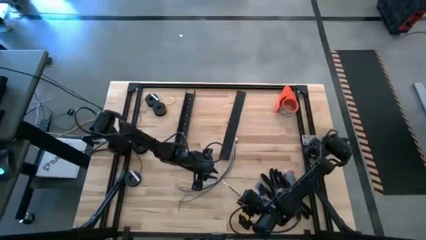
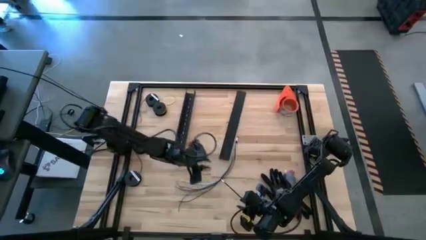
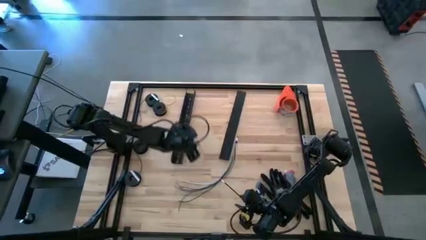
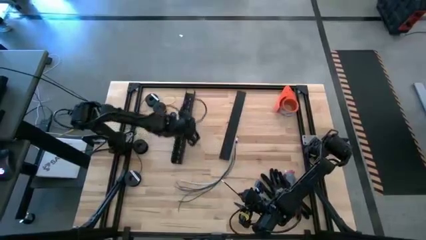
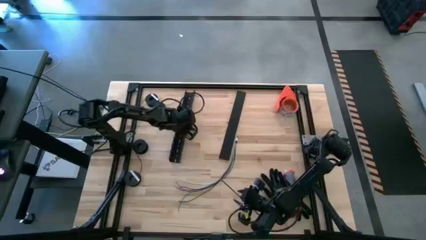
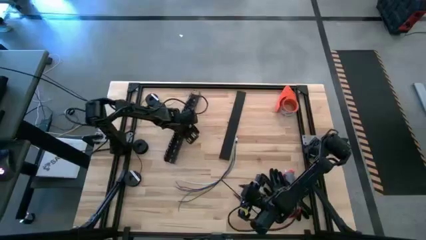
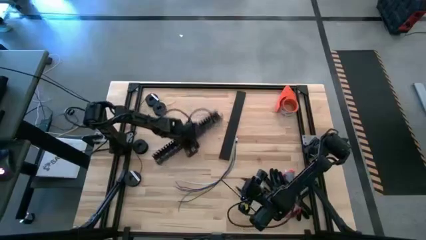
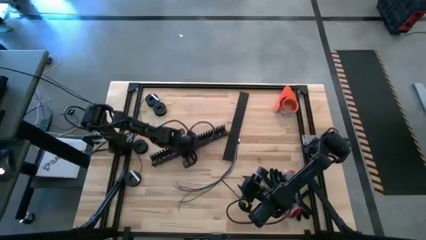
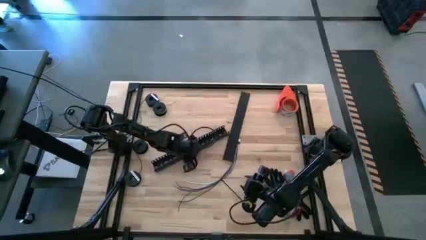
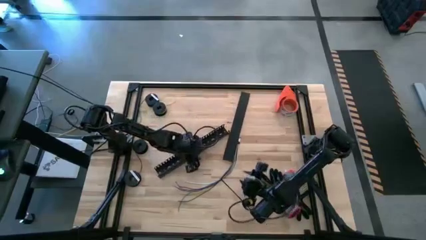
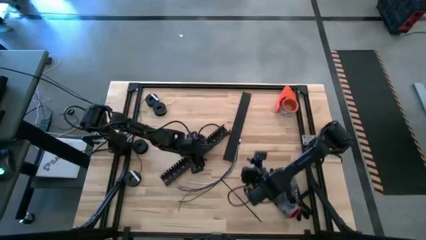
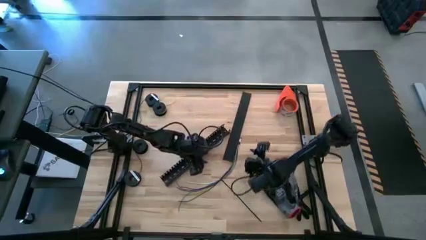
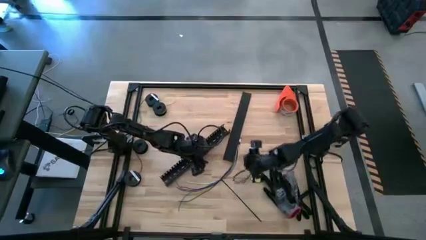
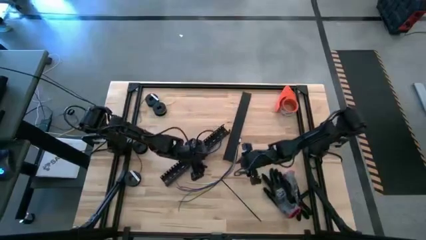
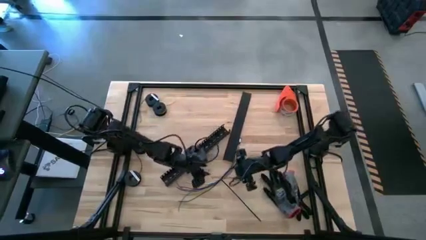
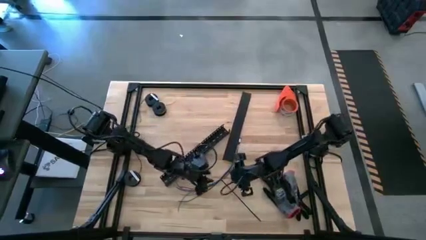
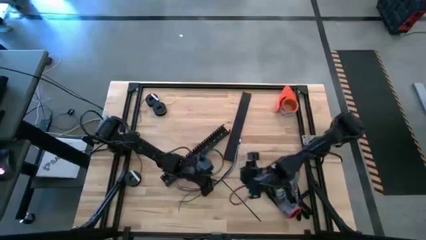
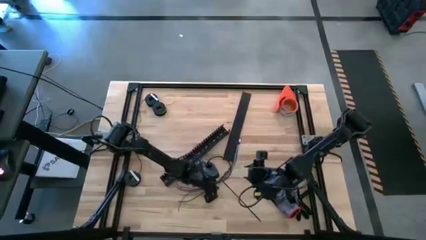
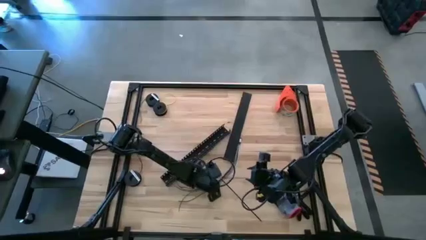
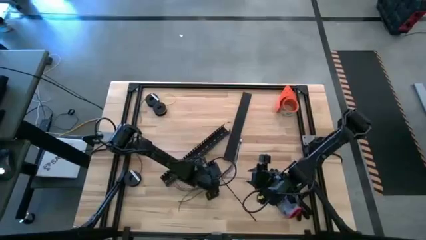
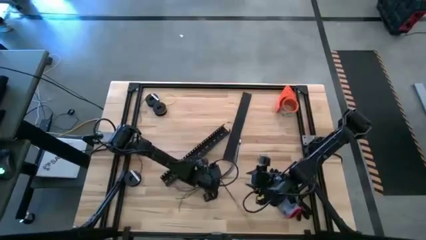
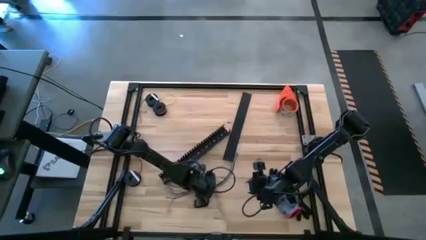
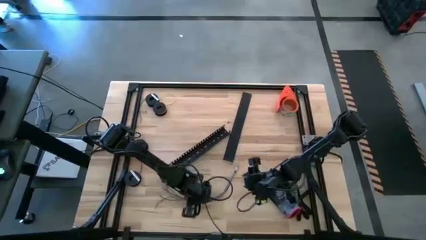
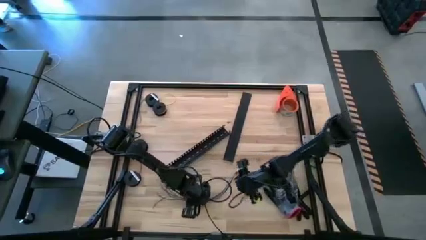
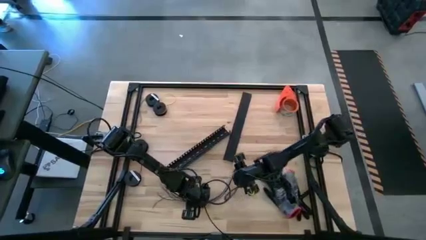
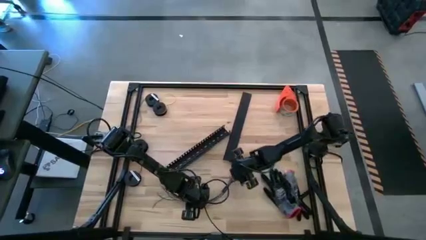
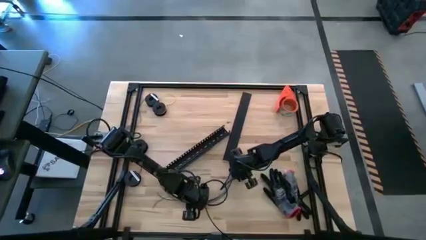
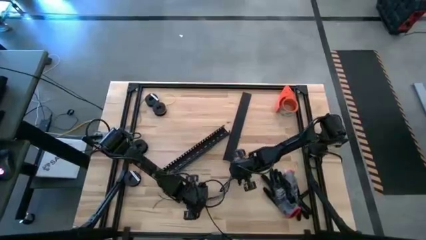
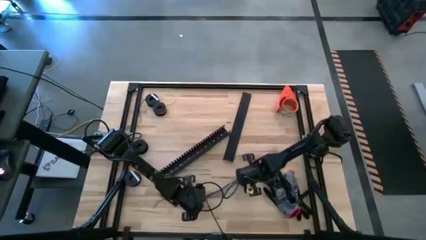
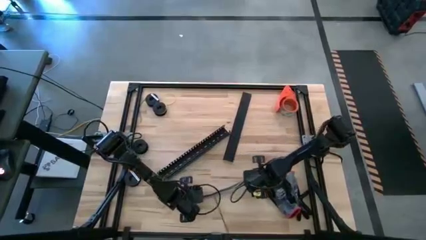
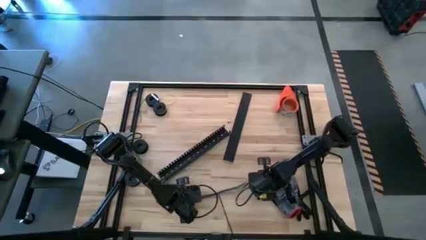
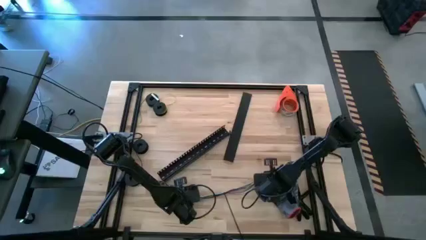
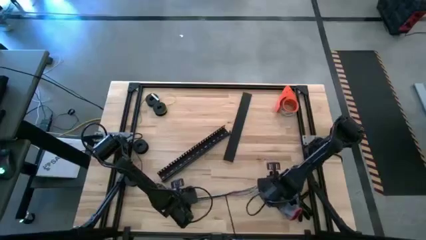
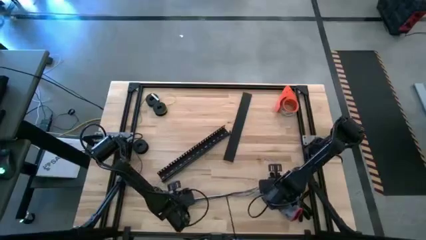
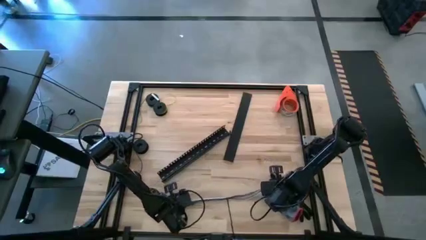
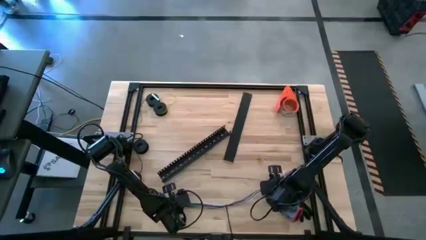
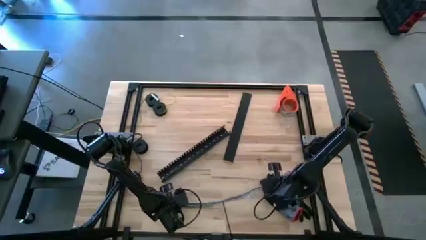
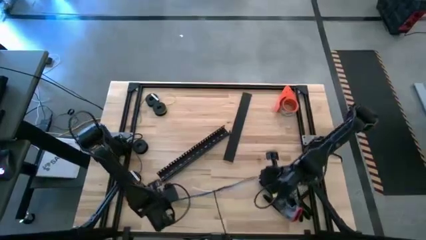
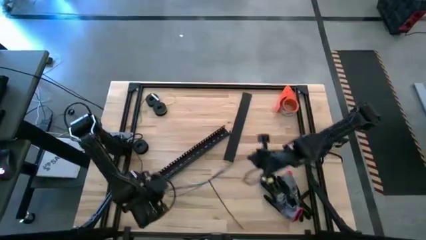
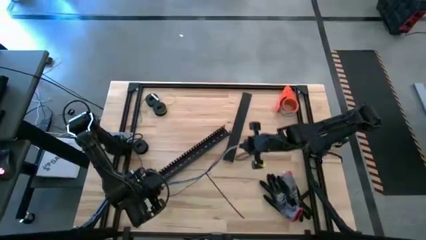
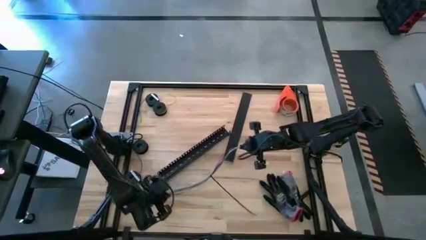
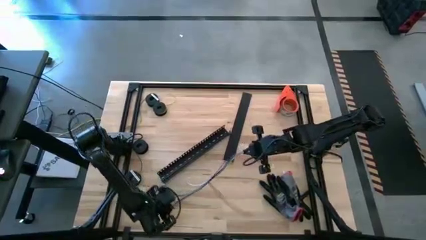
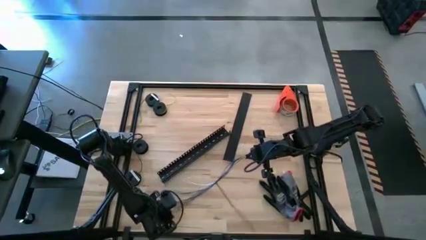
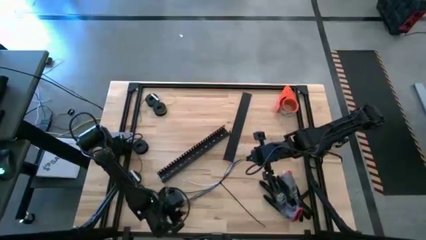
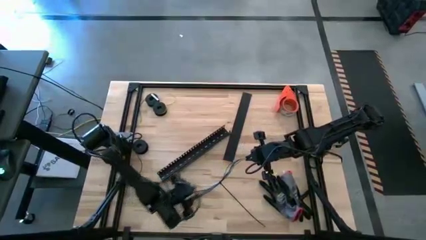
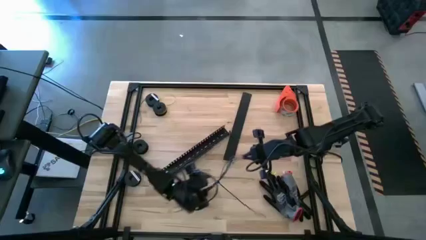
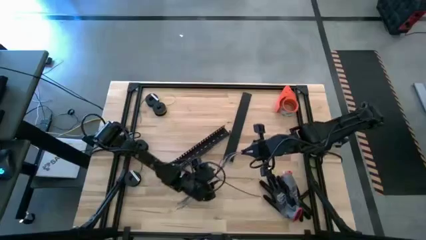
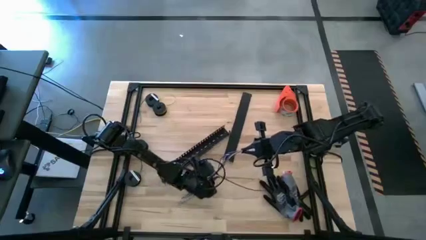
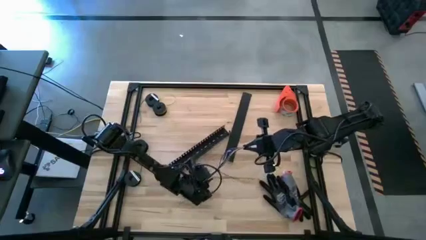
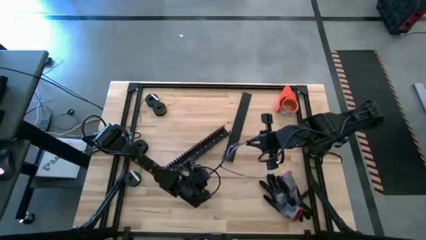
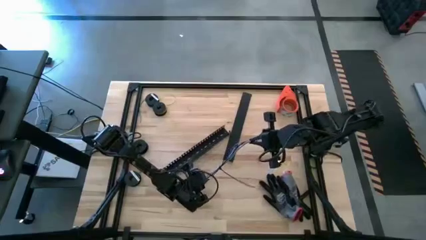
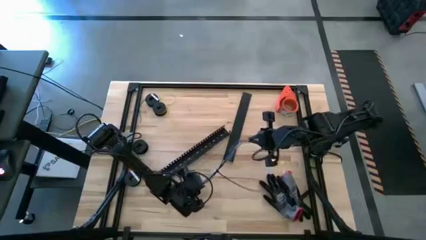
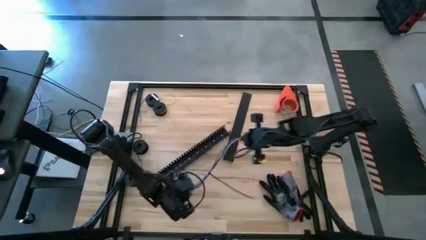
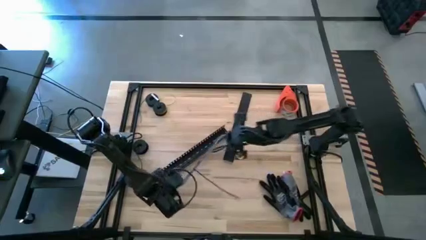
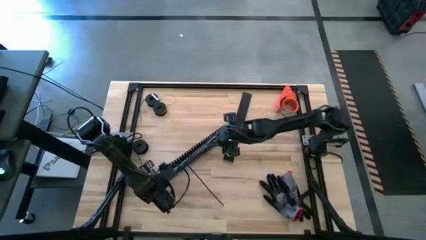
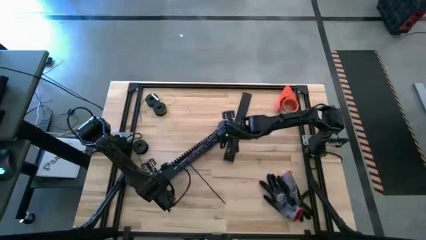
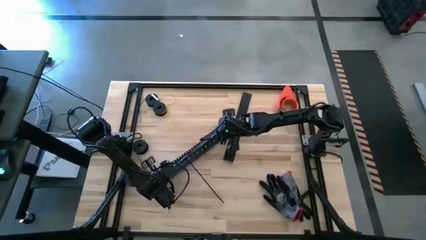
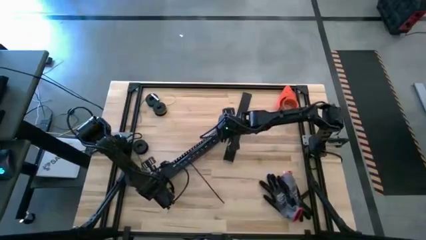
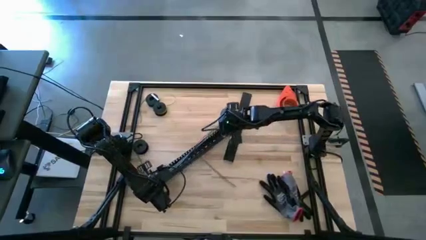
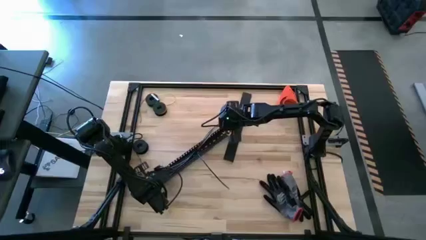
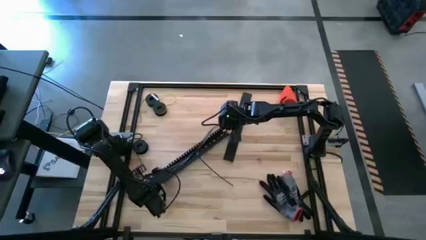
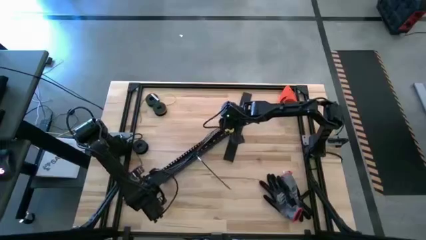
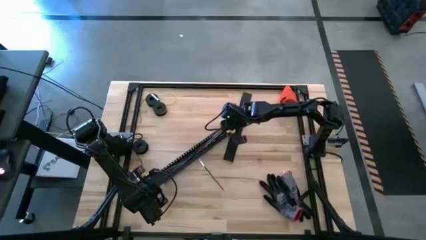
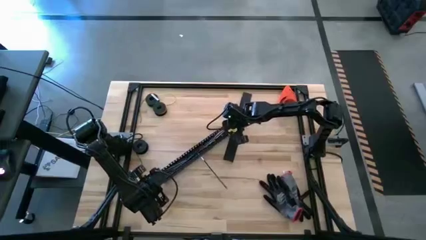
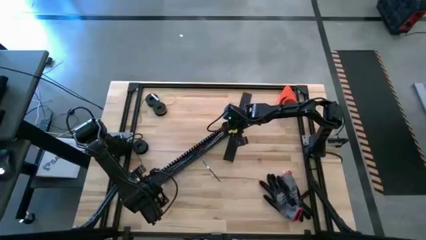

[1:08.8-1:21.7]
Task: Ziptie cables
Put the cable wires to the black cable duct

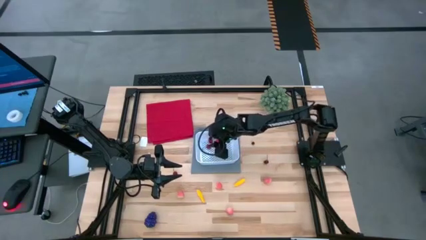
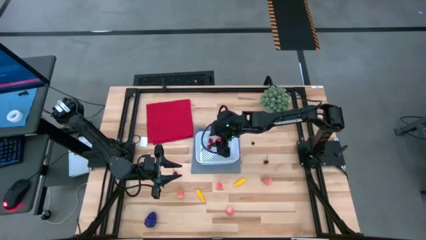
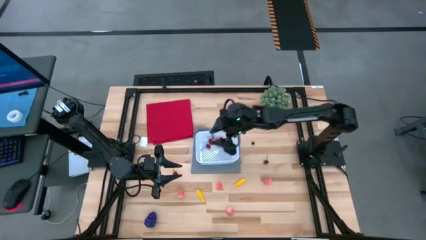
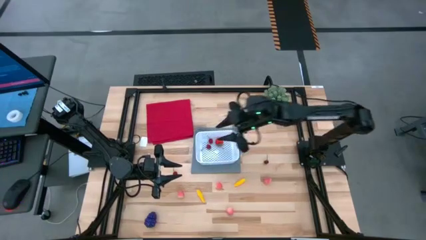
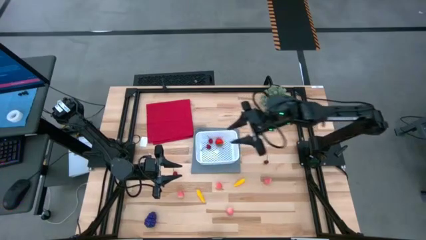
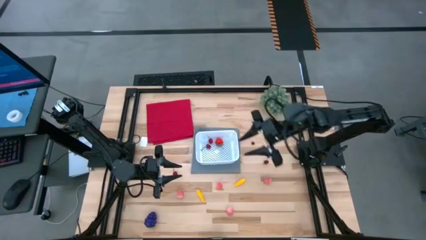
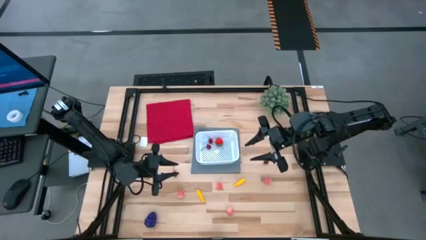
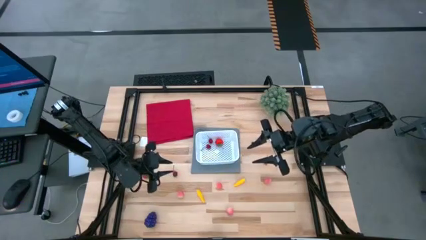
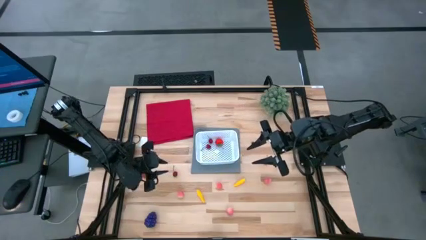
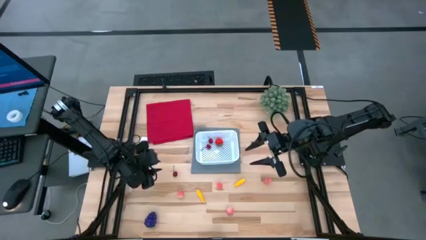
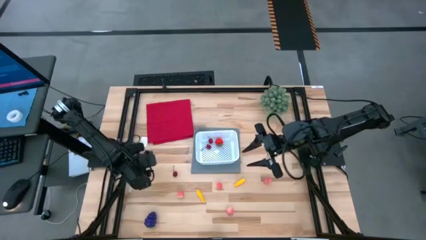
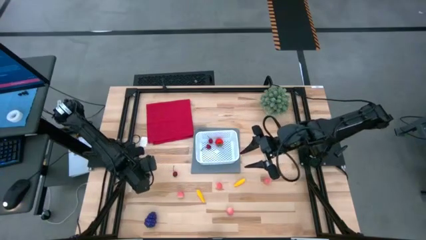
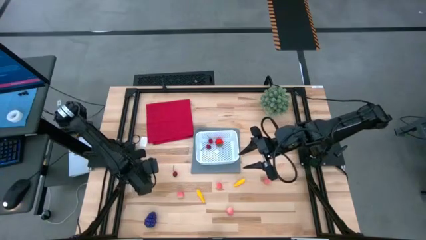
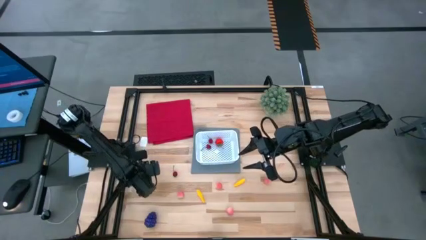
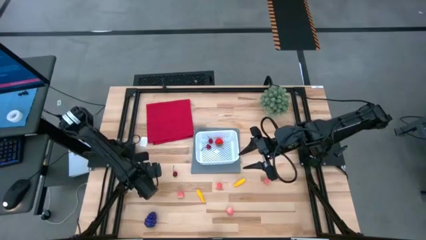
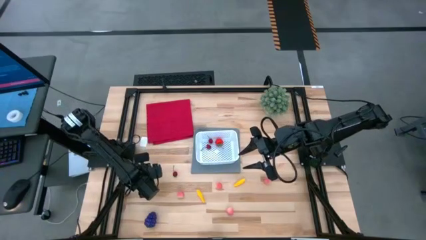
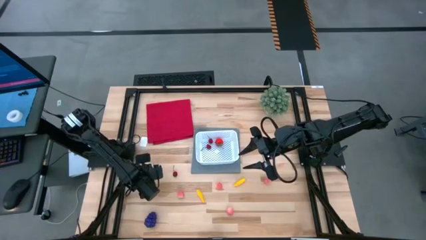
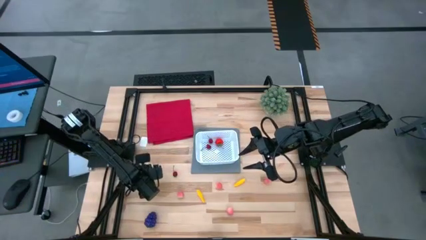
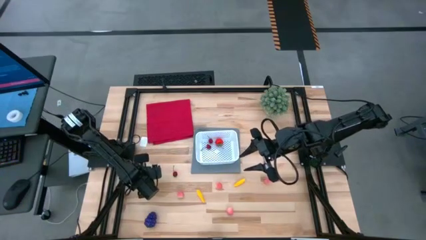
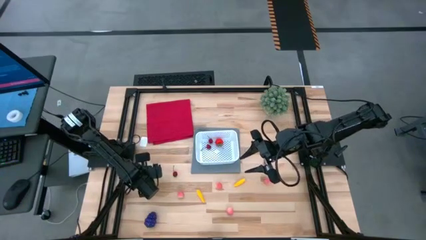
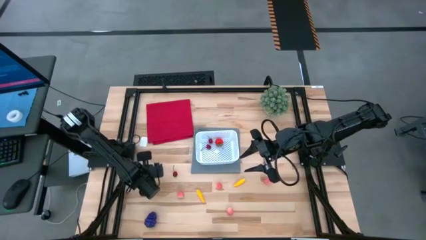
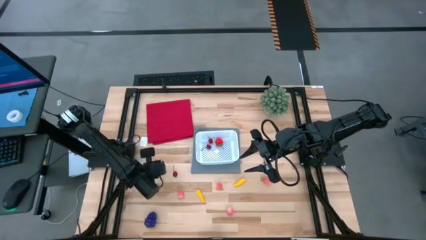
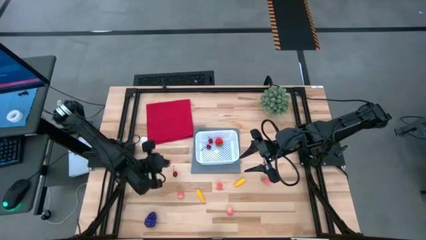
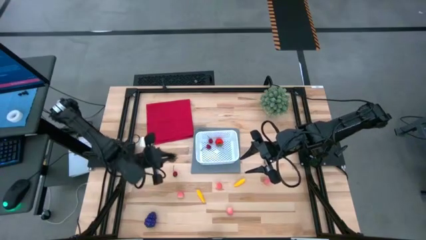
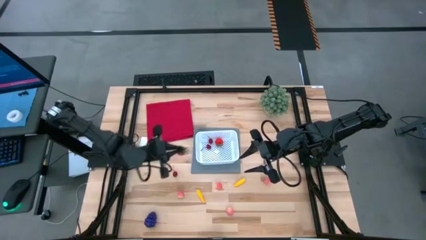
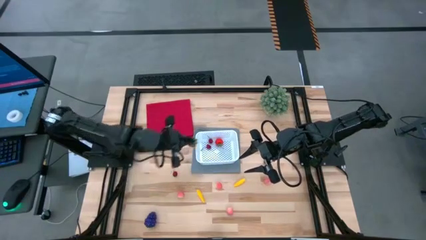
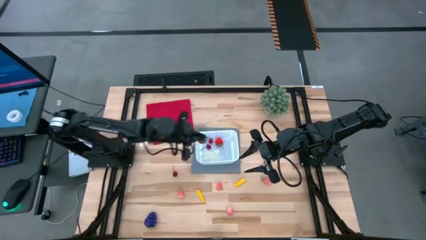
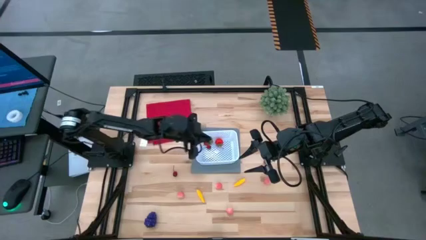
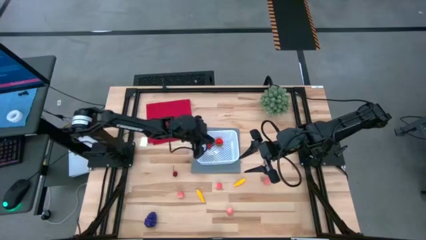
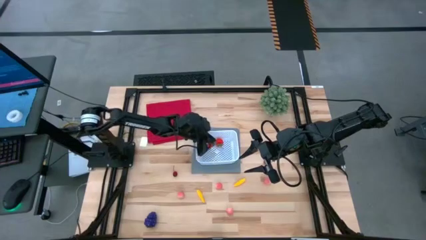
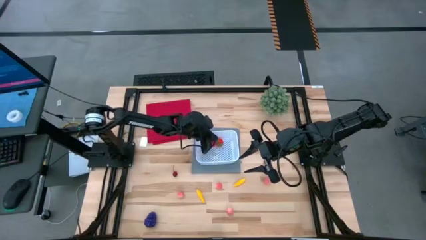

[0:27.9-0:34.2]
Task: Pick and placing Produce into tupperware
Put the strawberry into the white basket
